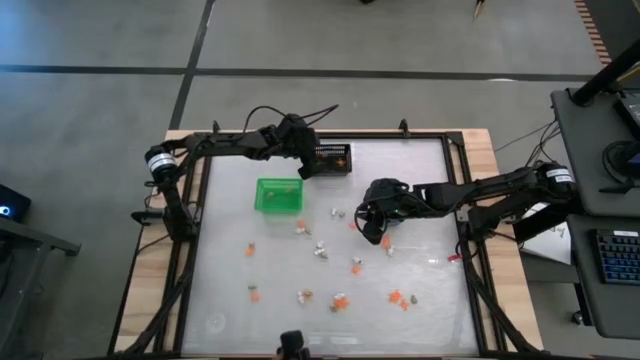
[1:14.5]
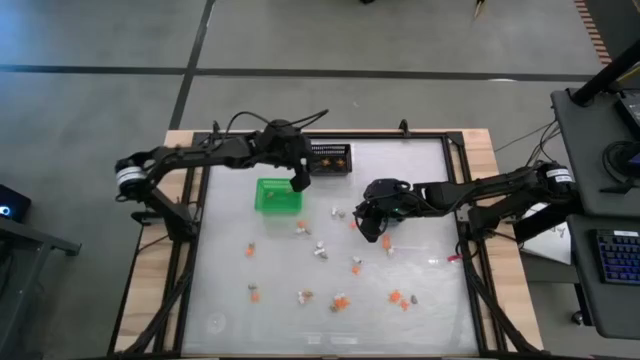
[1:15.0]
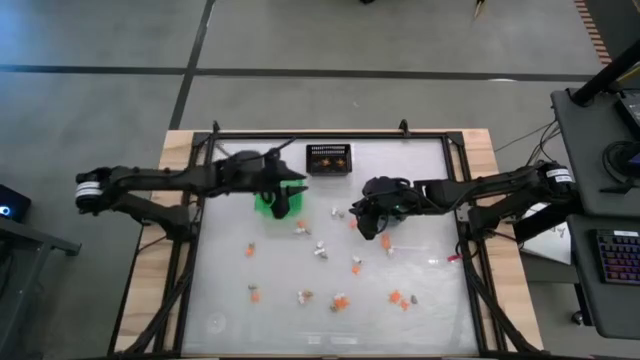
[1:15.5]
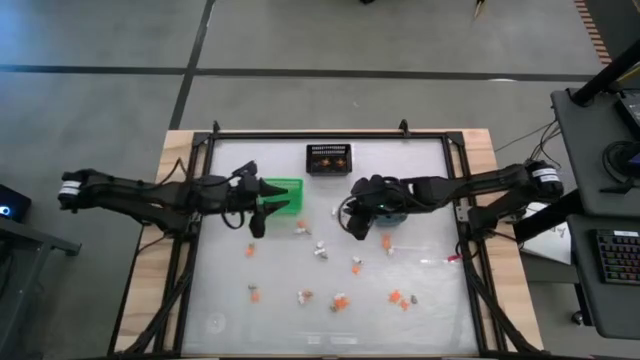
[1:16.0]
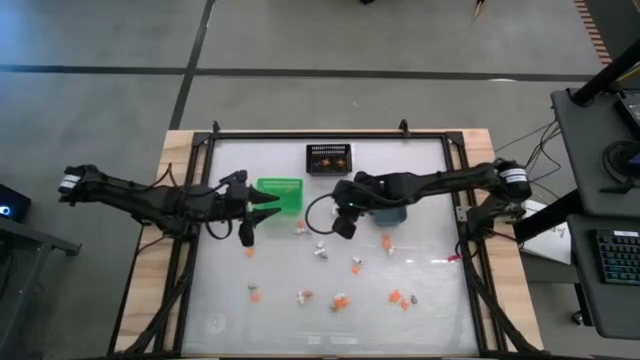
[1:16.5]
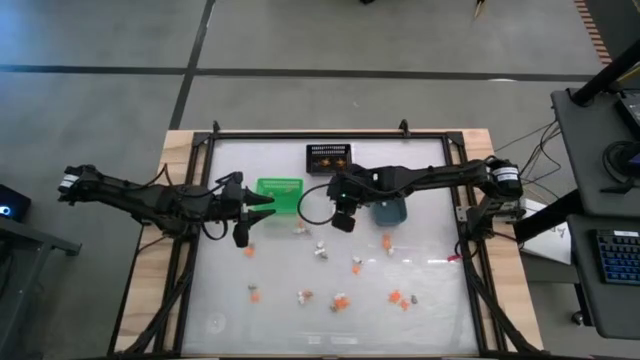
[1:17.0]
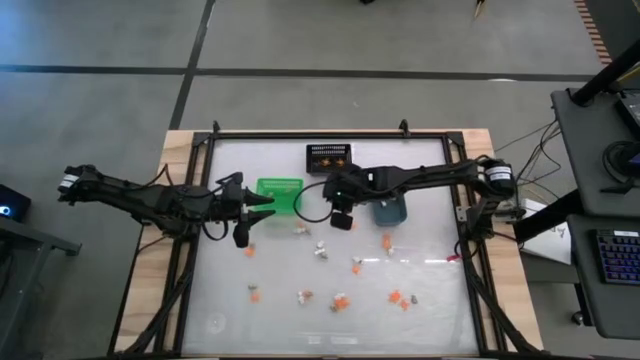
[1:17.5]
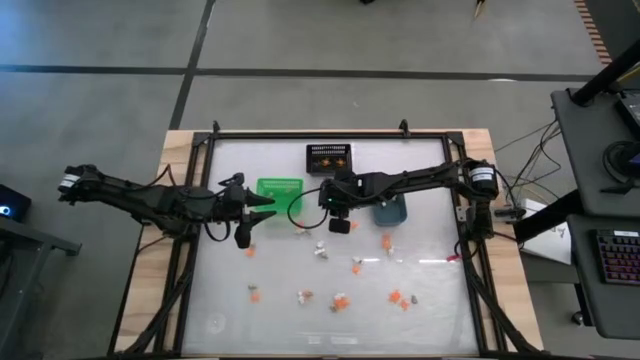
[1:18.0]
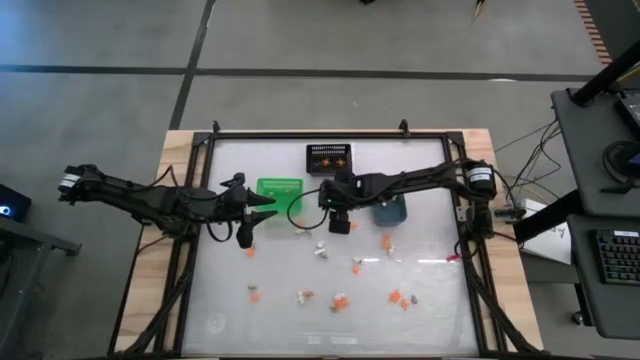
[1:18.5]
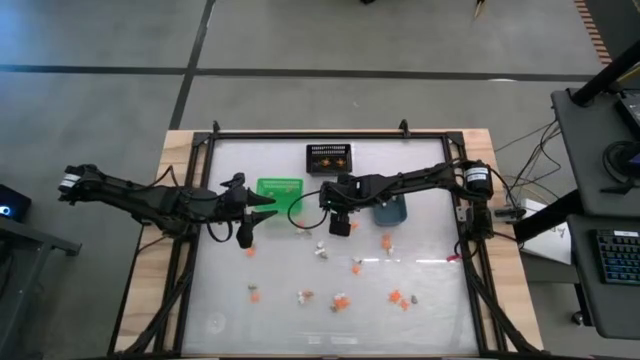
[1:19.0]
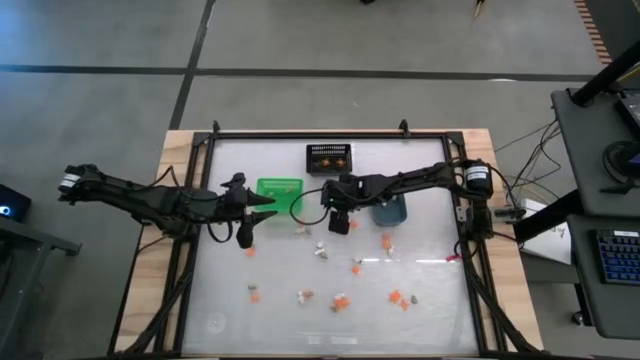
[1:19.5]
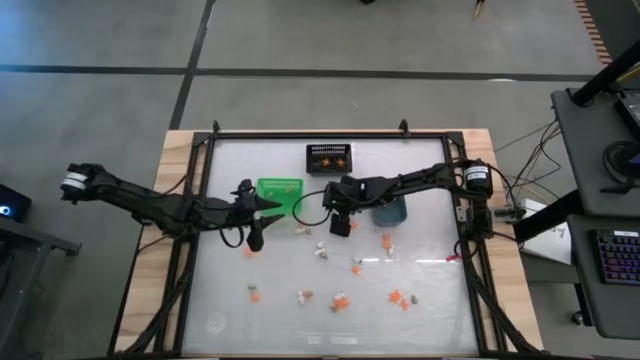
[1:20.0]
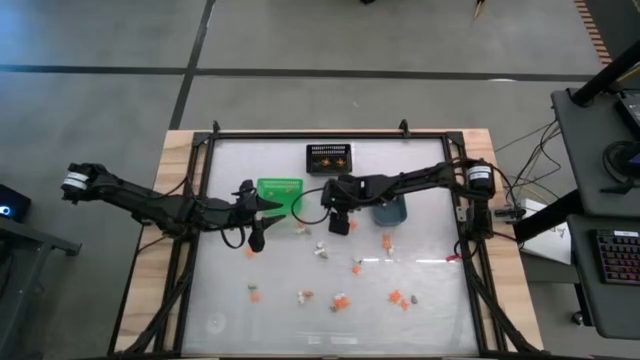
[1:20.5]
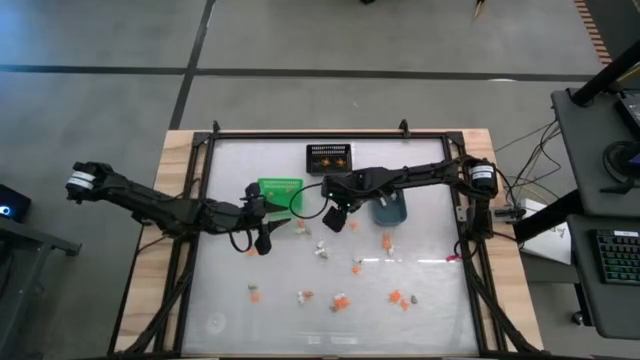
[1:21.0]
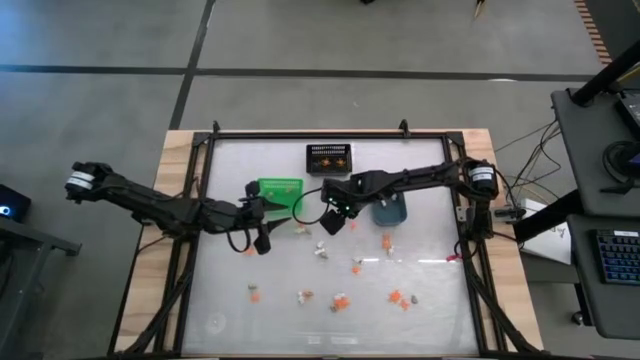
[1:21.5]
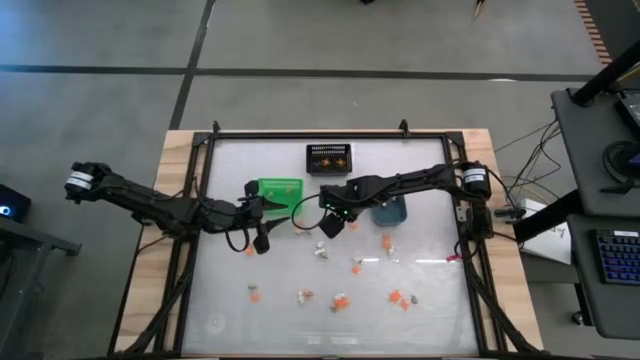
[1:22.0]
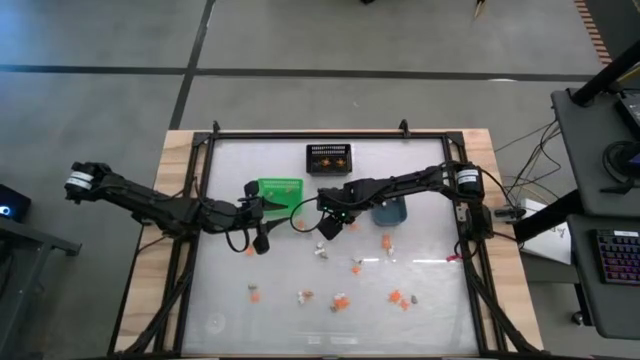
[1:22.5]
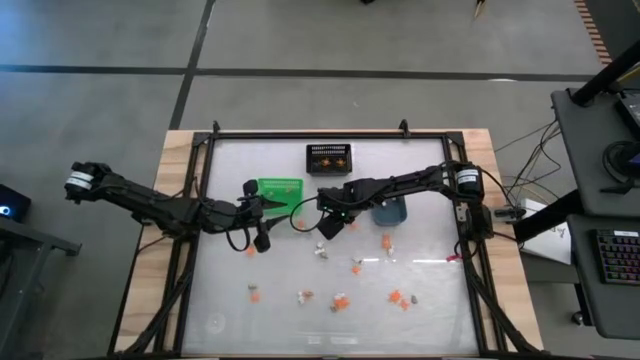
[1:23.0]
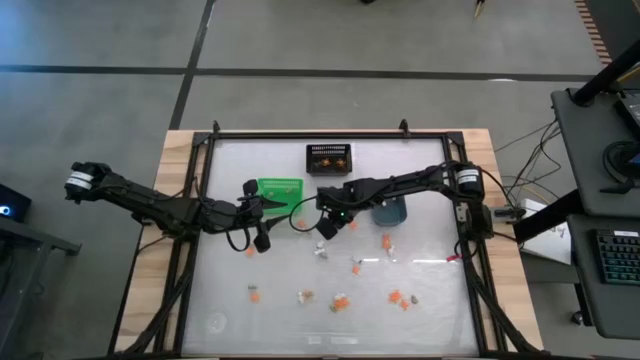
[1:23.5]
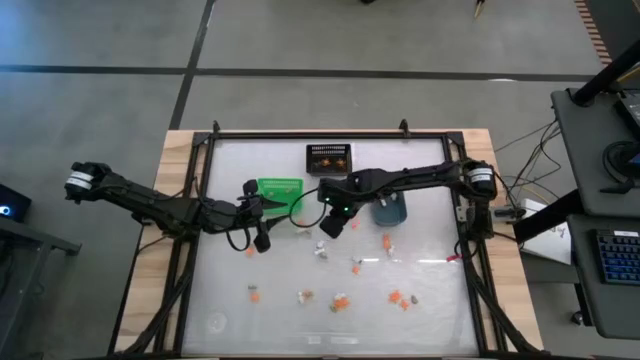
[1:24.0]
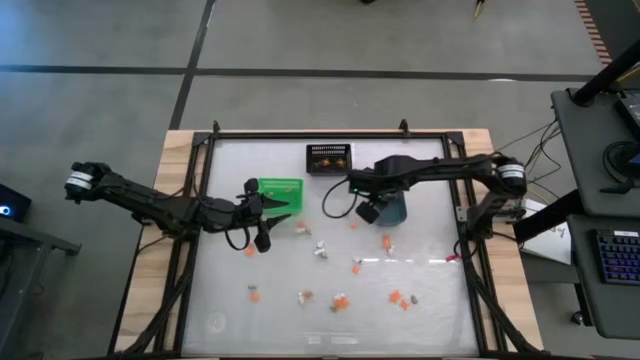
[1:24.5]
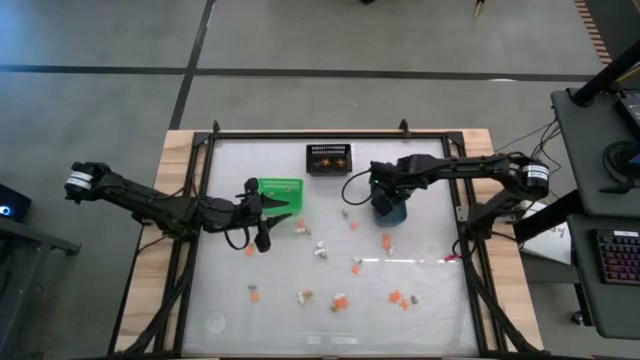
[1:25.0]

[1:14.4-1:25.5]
Task: Sort Halloween decoration
Put the white skeleton toy into the blue bin

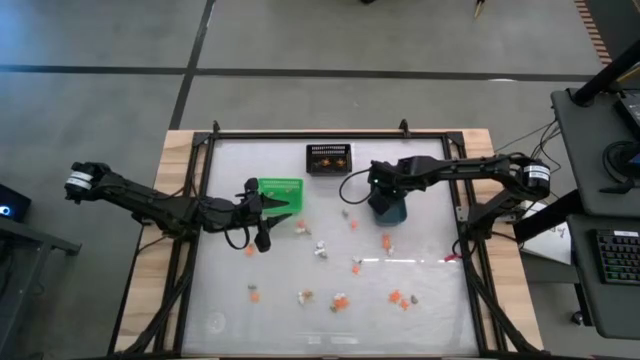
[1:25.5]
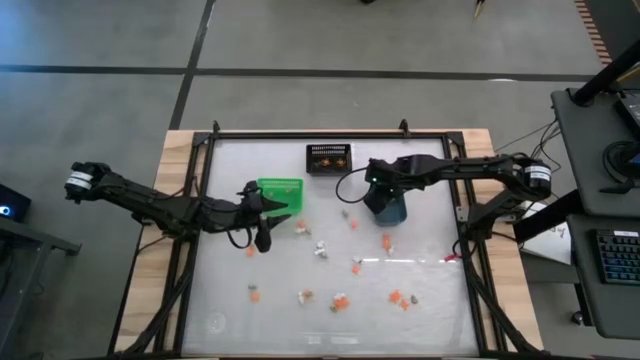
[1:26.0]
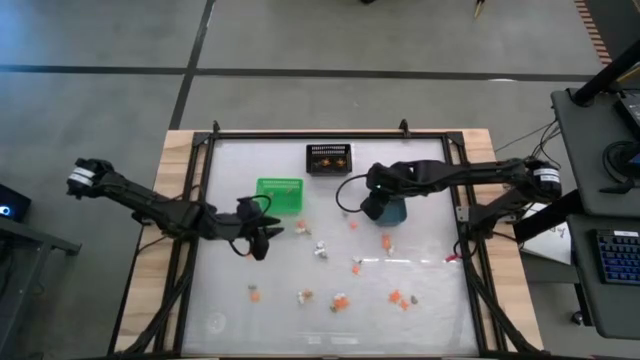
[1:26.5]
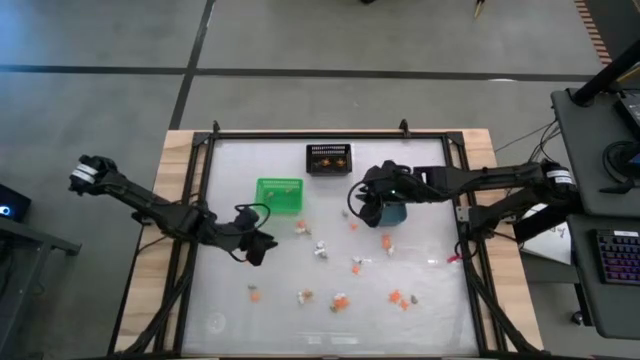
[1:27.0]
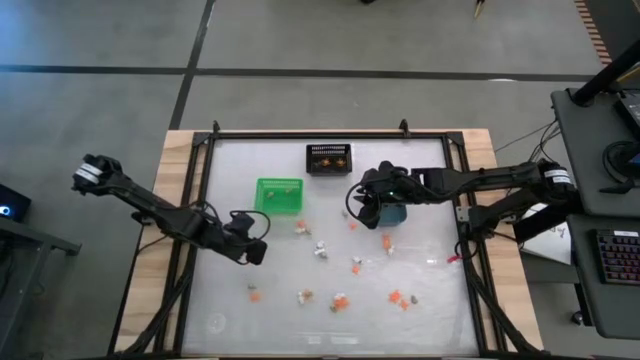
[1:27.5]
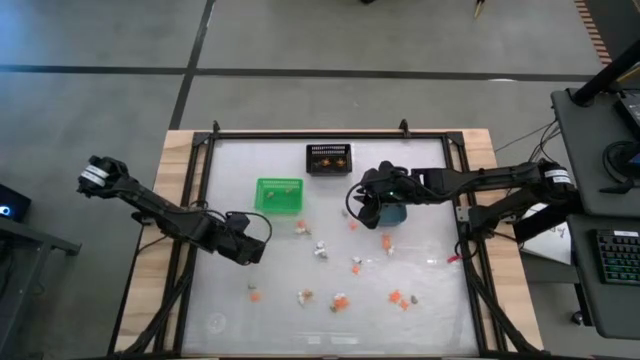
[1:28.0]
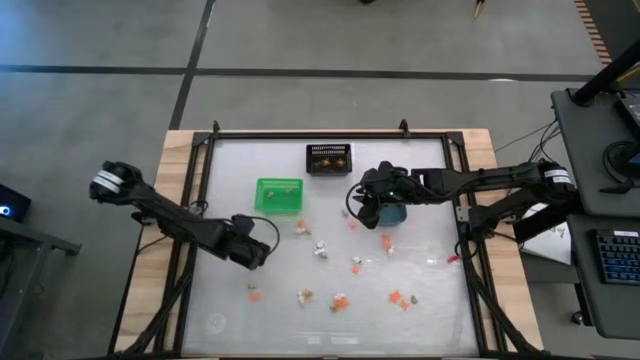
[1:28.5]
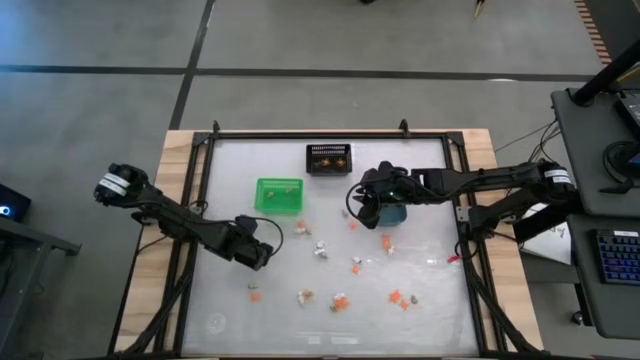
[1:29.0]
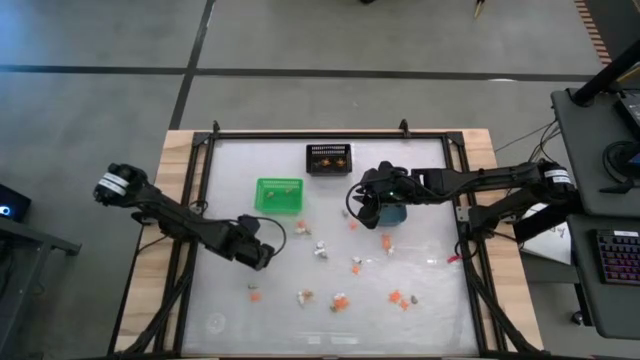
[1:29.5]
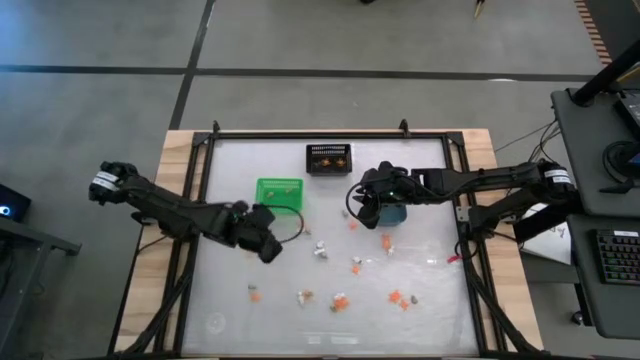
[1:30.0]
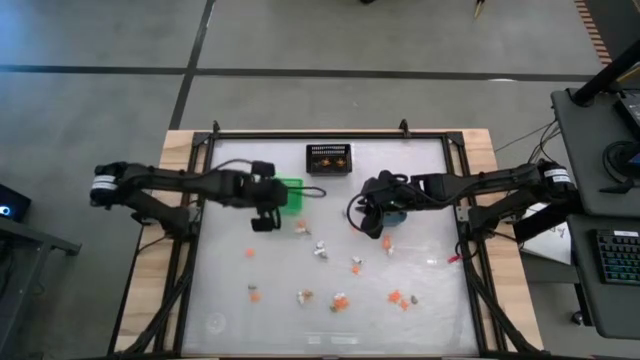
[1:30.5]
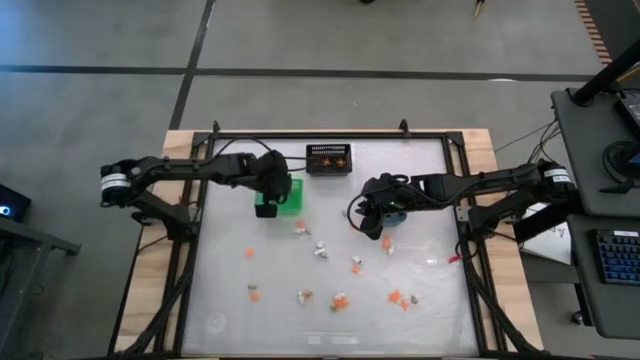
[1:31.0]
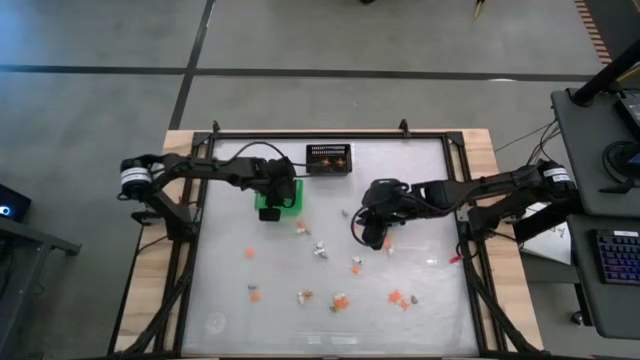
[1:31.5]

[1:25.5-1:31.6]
Put the gray skull toy into the green bin

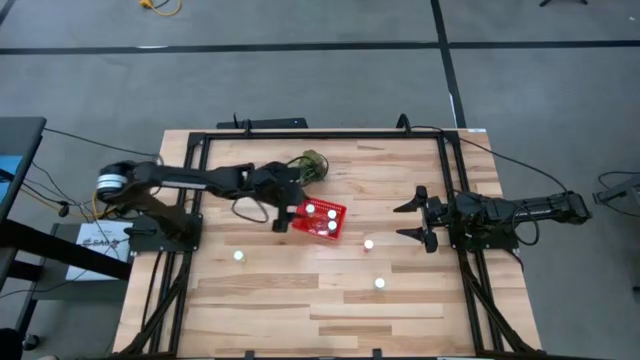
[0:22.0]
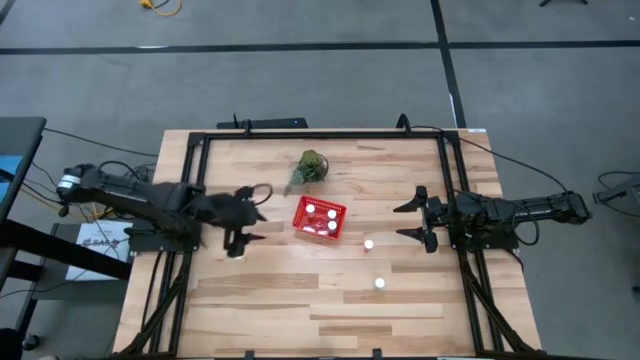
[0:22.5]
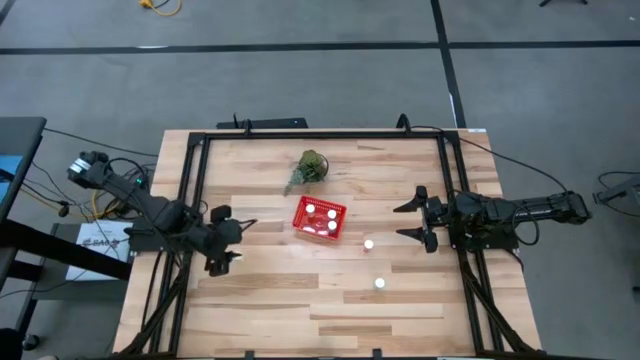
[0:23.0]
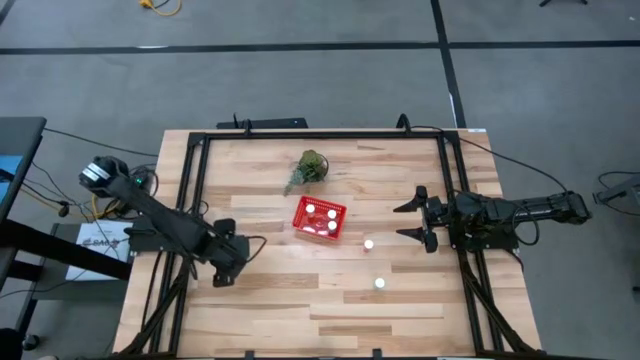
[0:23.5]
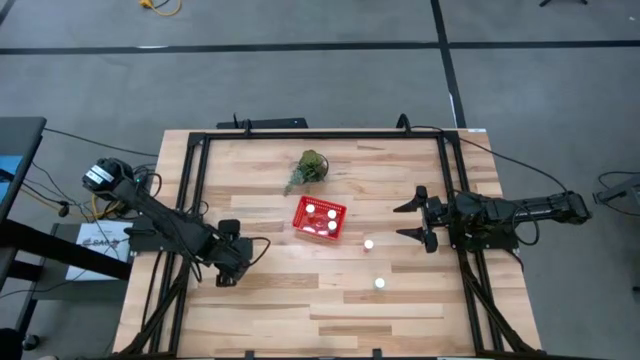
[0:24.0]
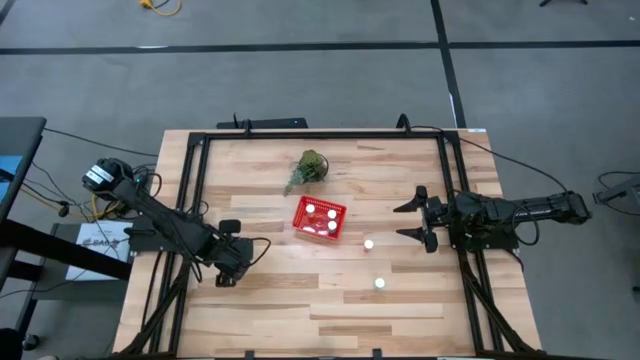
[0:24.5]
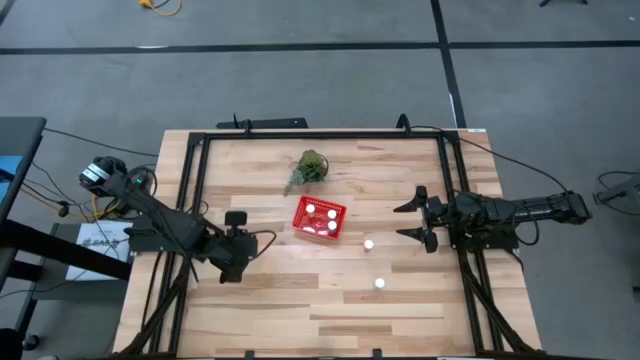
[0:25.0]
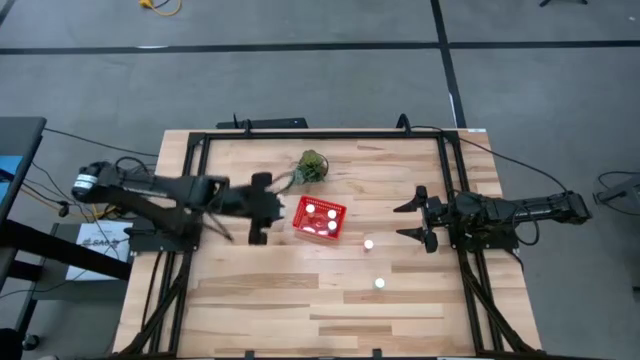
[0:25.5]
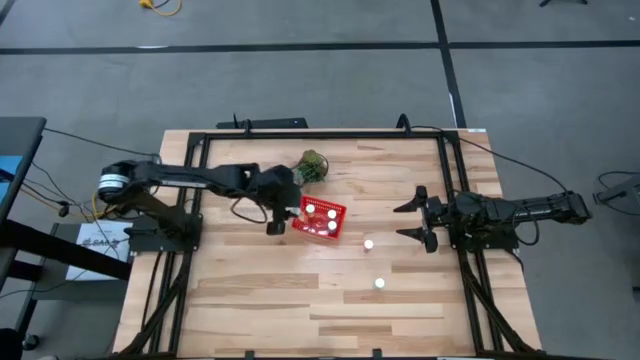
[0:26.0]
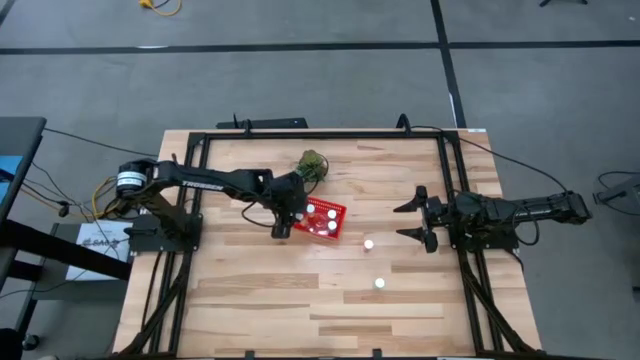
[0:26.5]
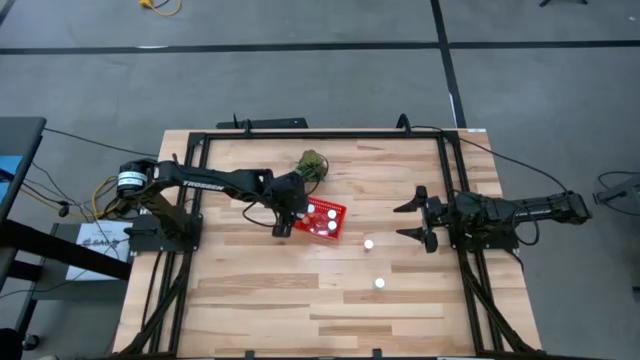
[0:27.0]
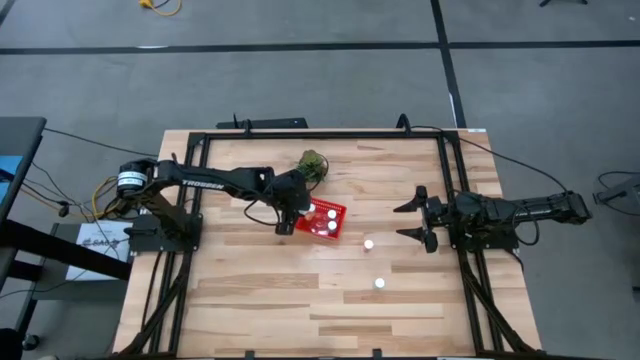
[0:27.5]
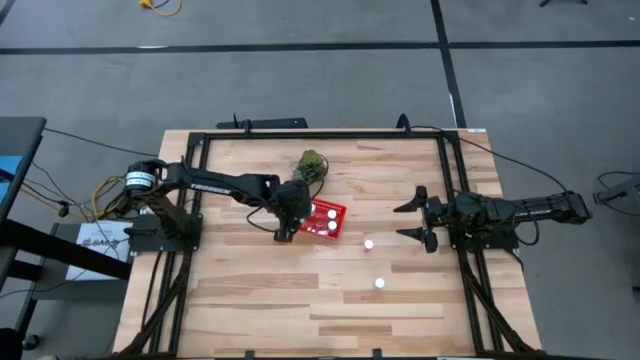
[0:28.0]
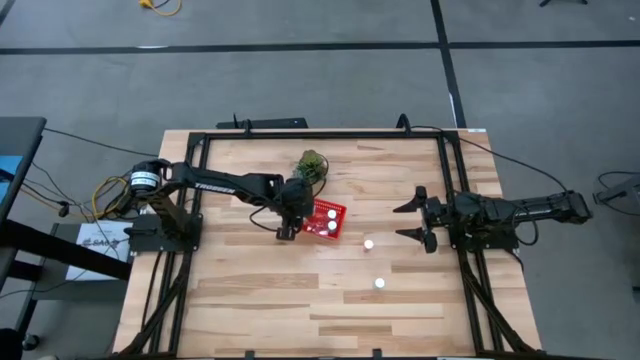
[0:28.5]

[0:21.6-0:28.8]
Task: Pick and place pill bottles into a basket
Put the yellow medicine bottle into the red bin
